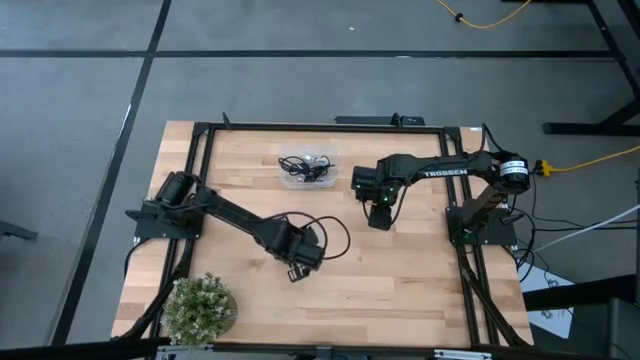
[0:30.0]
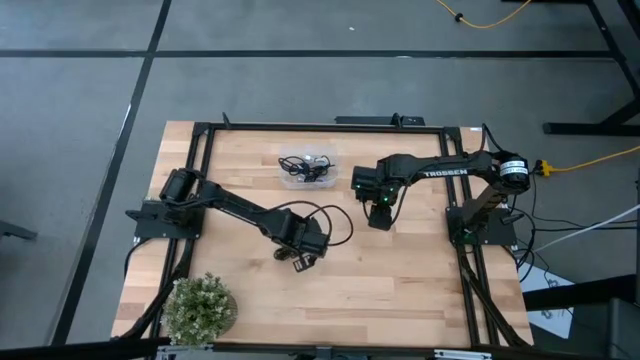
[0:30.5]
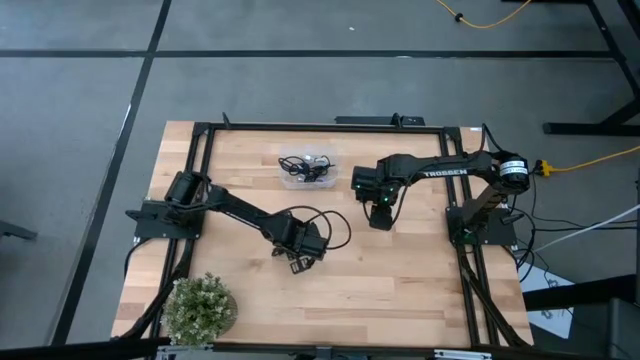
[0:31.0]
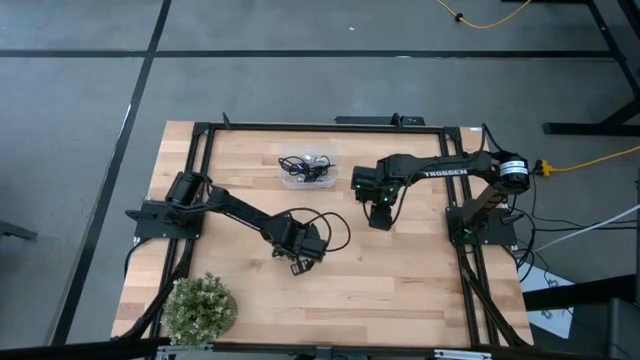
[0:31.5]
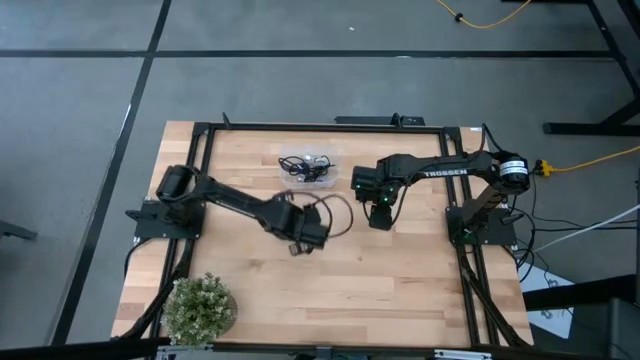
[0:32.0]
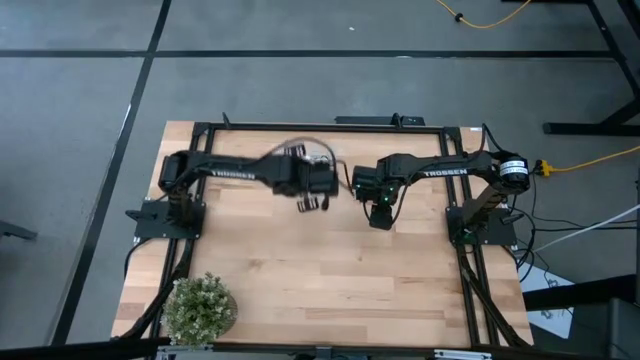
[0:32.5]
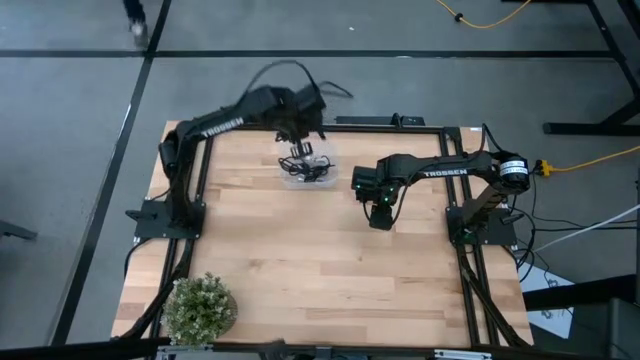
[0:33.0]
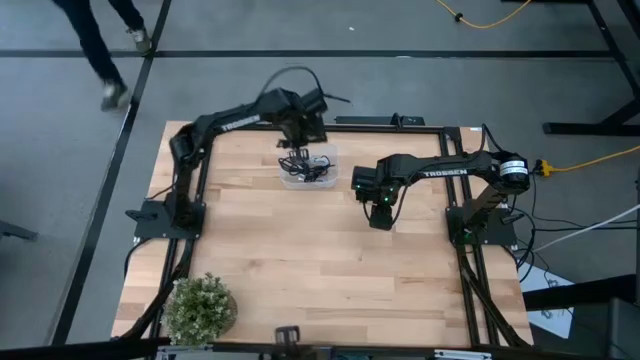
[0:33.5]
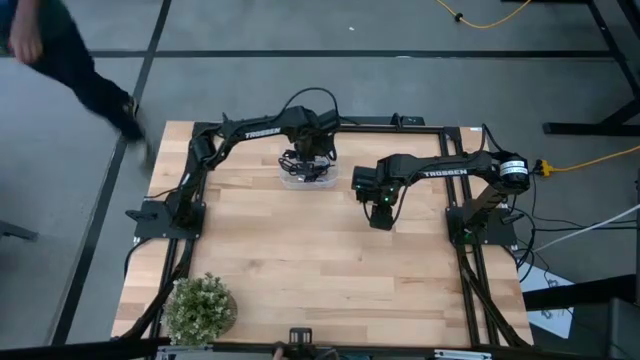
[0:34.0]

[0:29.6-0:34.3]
Task: Pick and place USB-C Cables
Put the black charger cable into the transparent bin

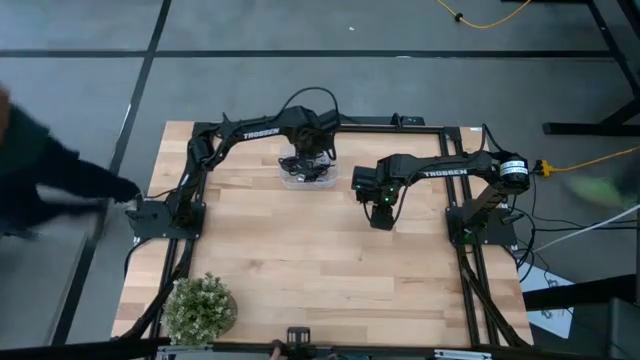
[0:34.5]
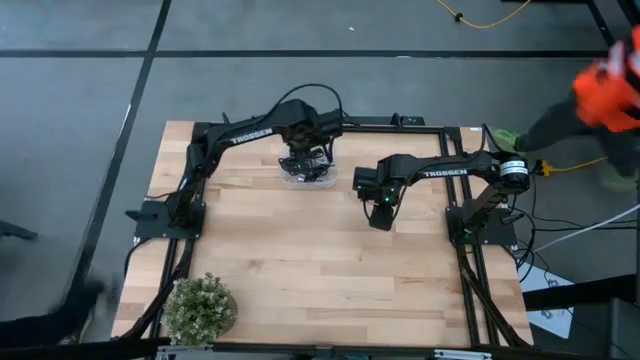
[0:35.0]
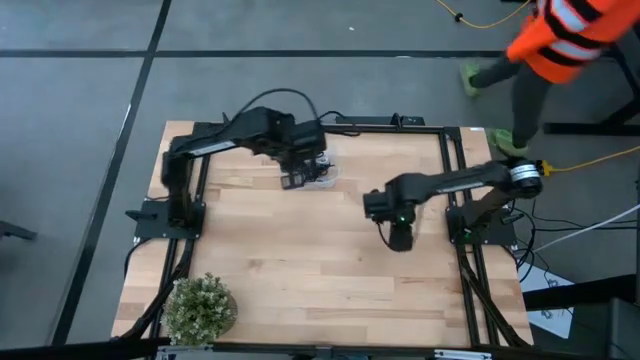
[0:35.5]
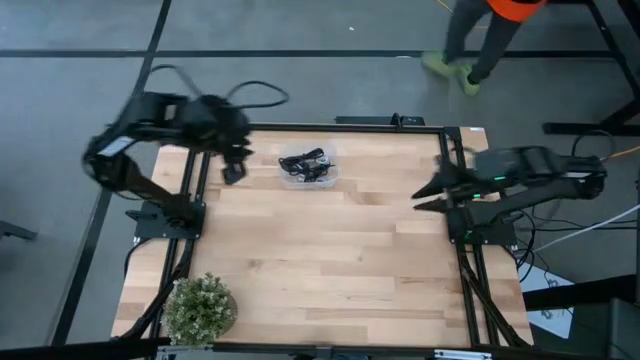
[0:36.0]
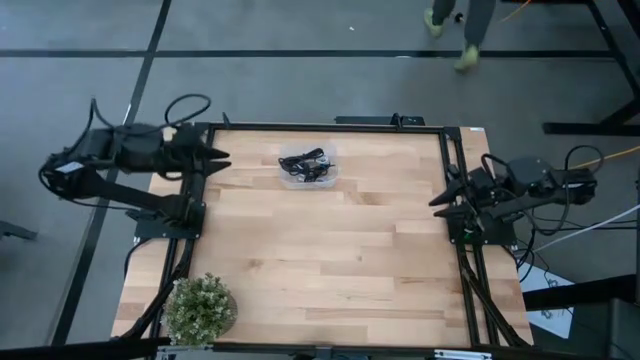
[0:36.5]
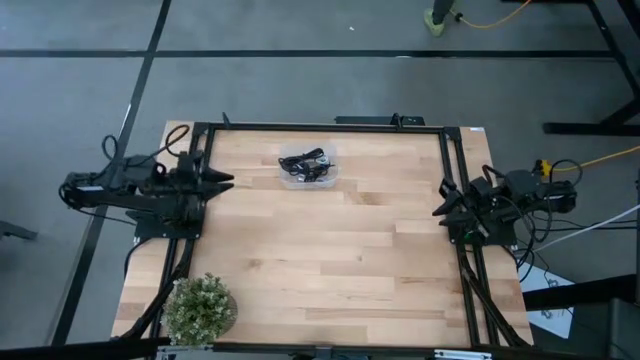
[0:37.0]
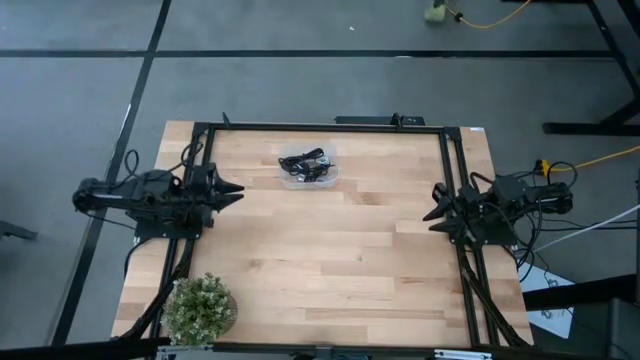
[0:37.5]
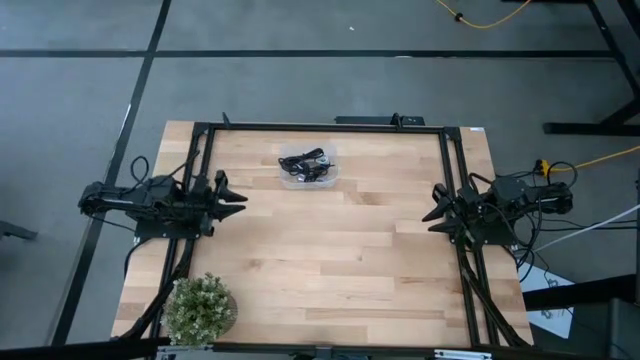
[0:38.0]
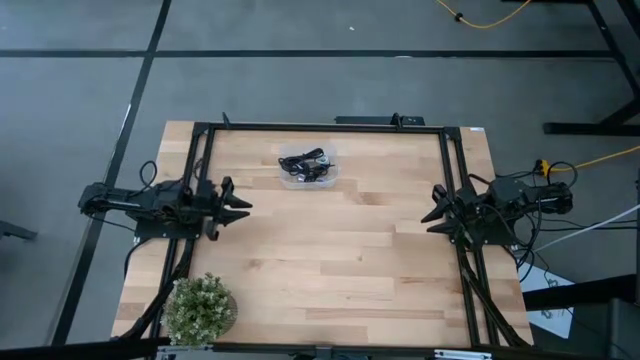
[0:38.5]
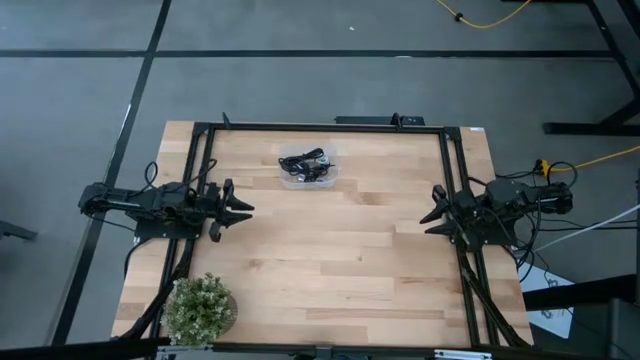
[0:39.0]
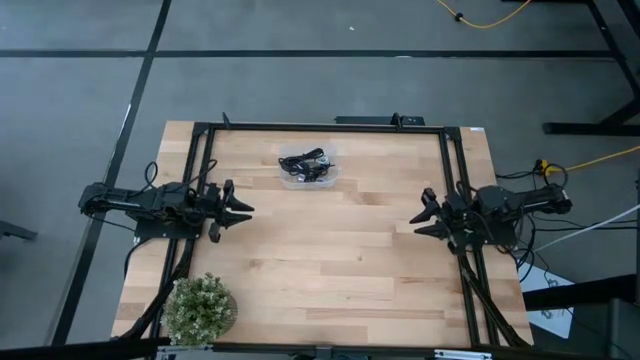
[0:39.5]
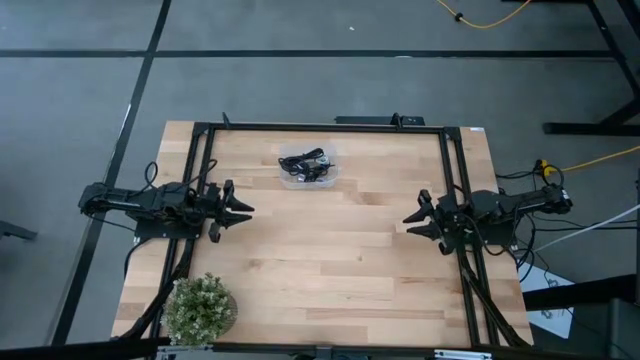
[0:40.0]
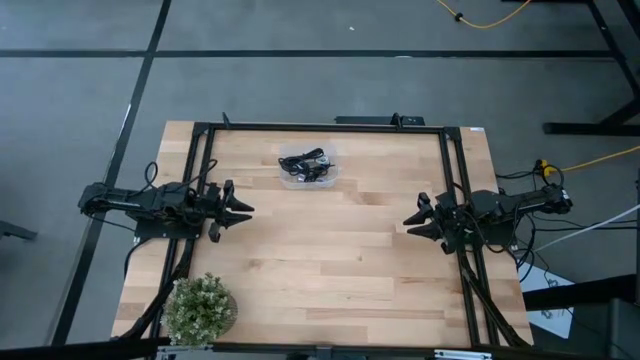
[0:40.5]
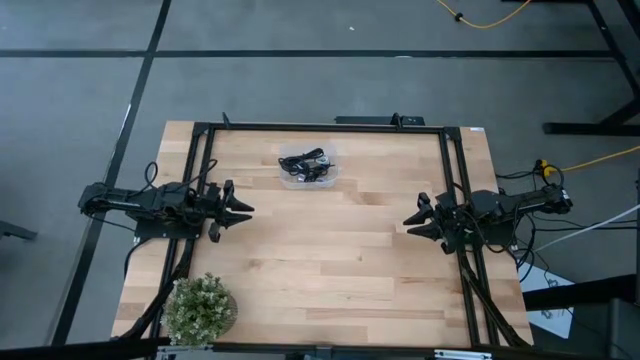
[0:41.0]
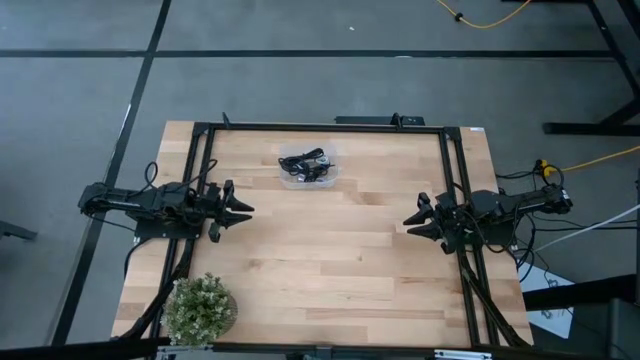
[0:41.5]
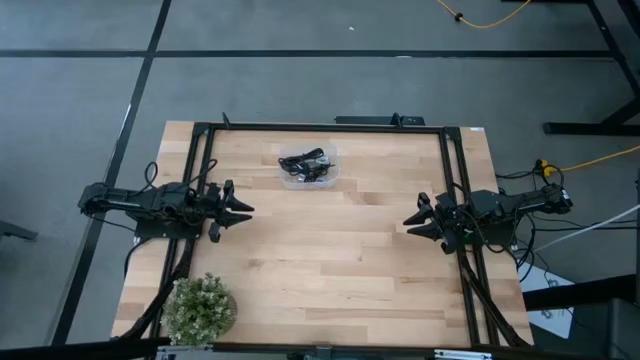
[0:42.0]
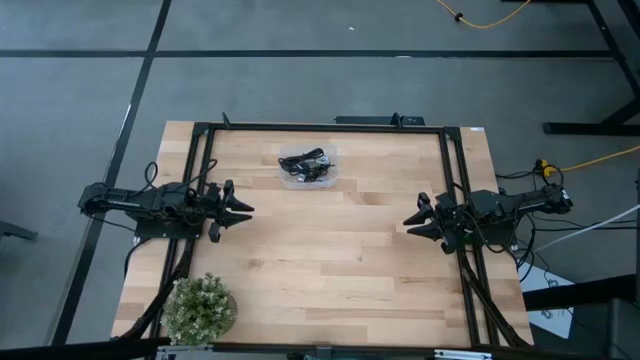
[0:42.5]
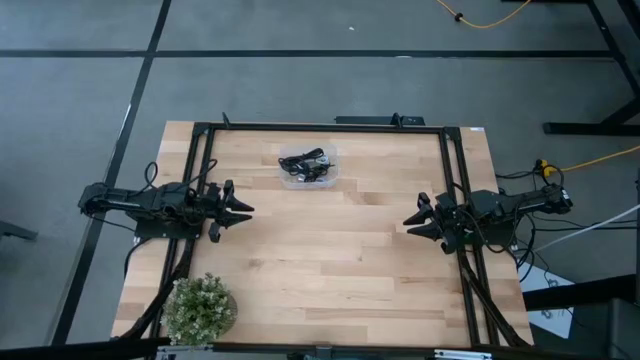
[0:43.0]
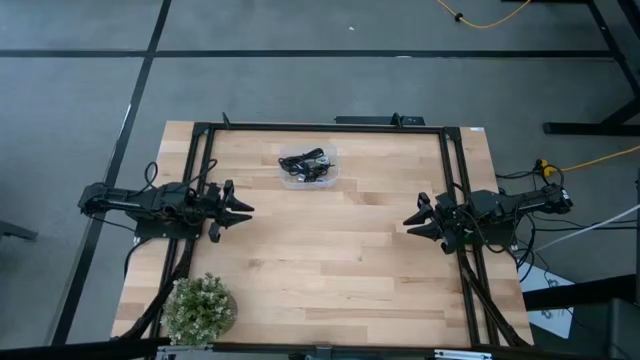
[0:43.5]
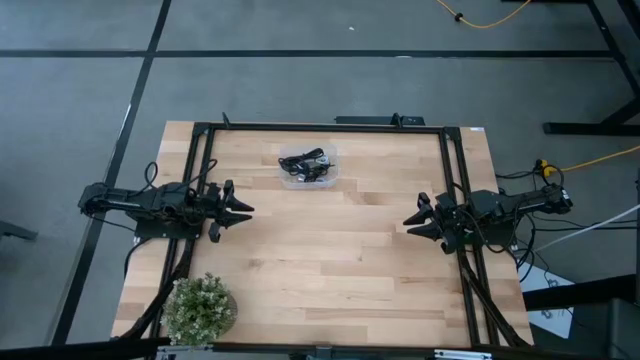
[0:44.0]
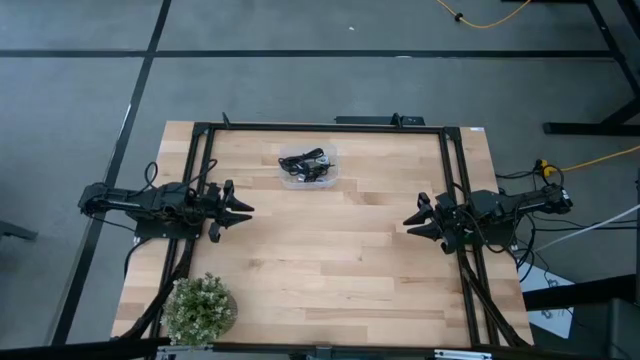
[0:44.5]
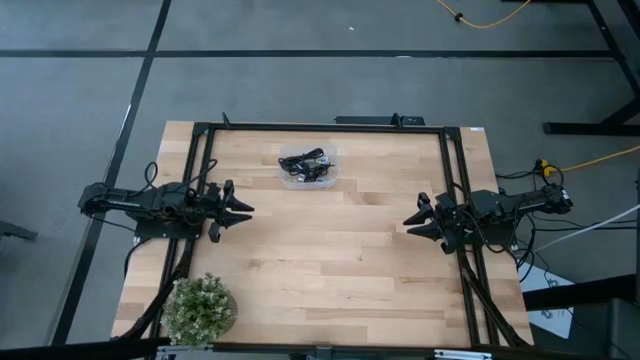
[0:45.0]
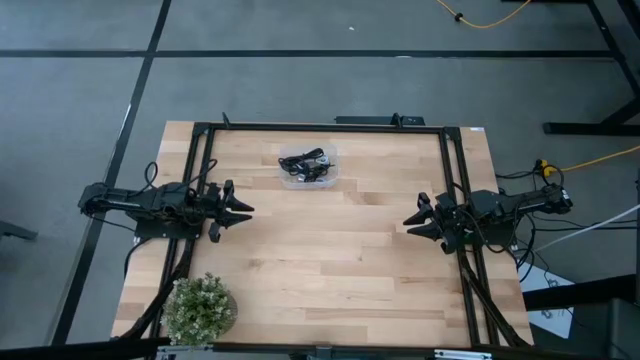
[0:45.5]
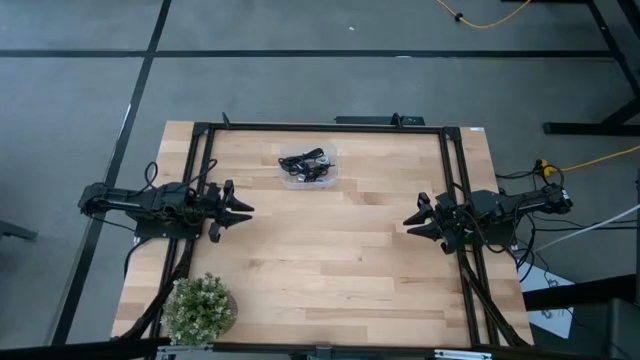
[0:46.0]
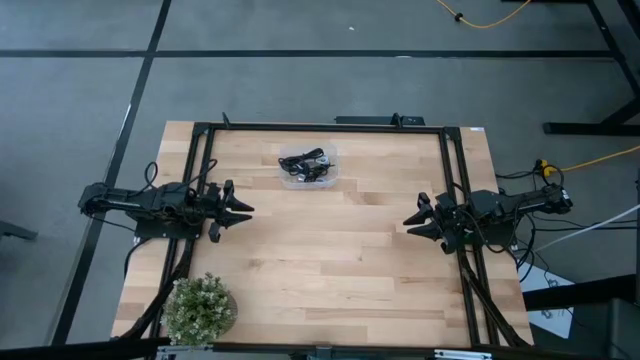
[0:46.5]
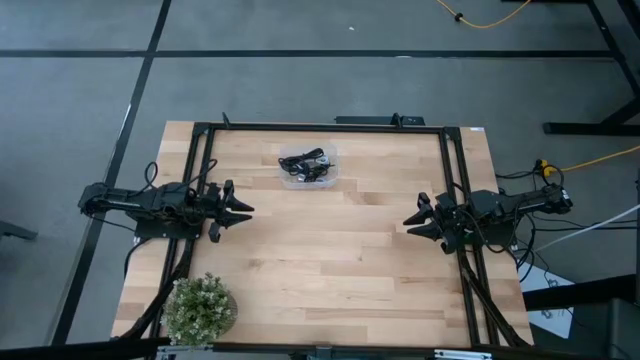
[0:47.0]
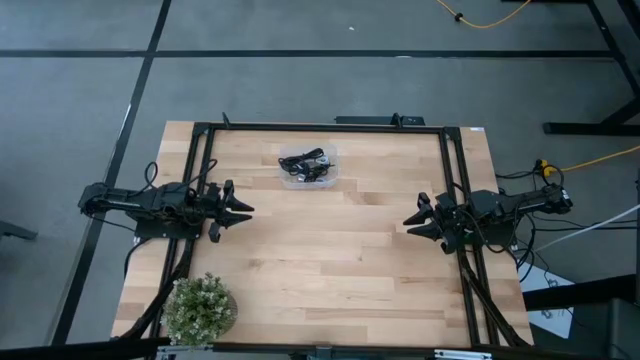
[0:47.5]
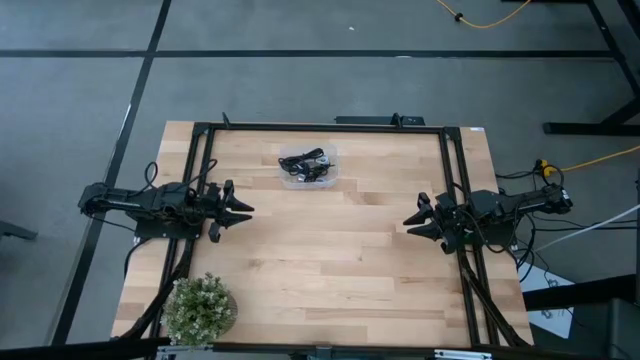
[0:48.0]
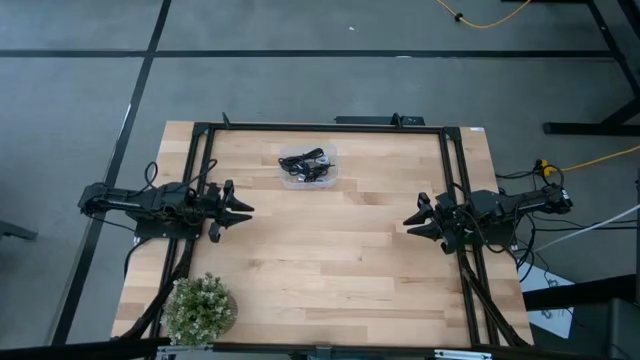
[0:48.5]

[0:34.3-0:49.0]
Return to Home Position

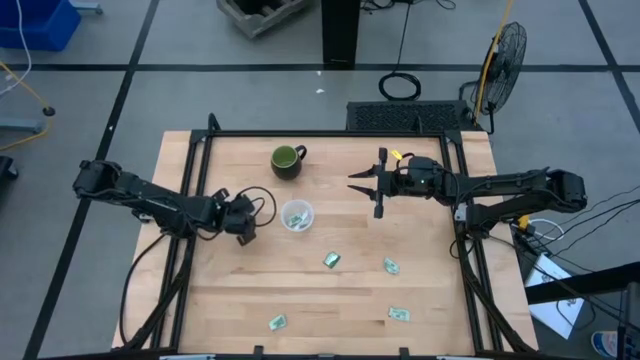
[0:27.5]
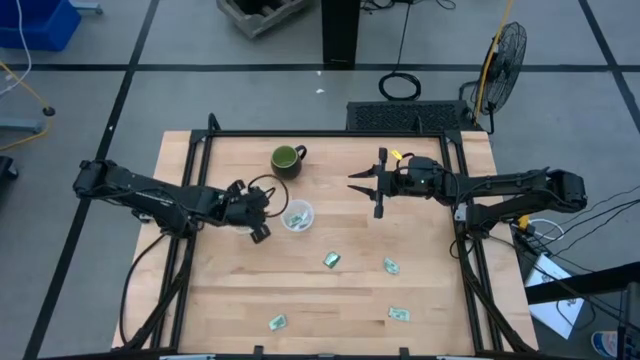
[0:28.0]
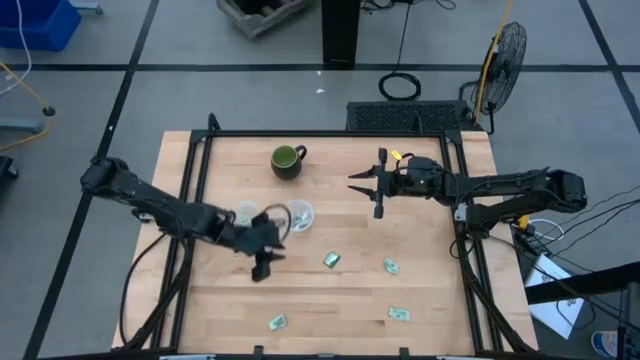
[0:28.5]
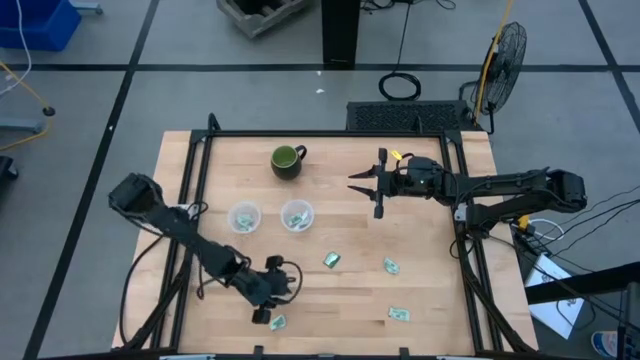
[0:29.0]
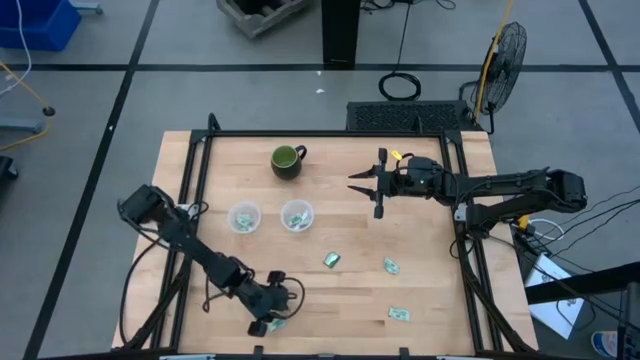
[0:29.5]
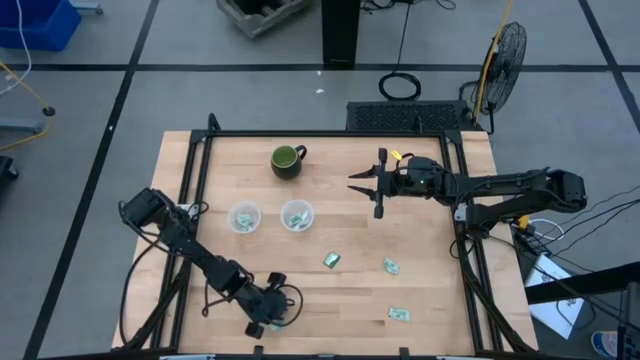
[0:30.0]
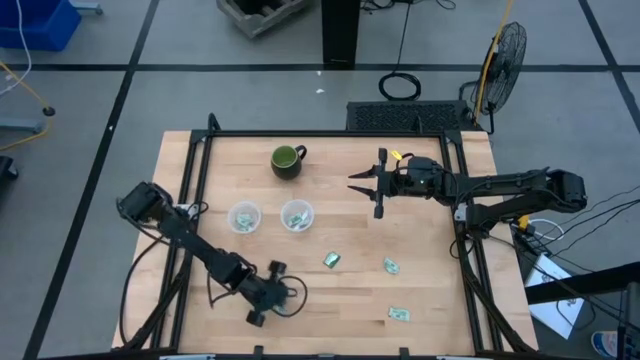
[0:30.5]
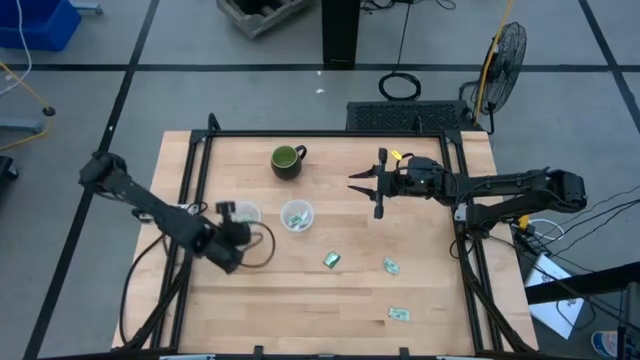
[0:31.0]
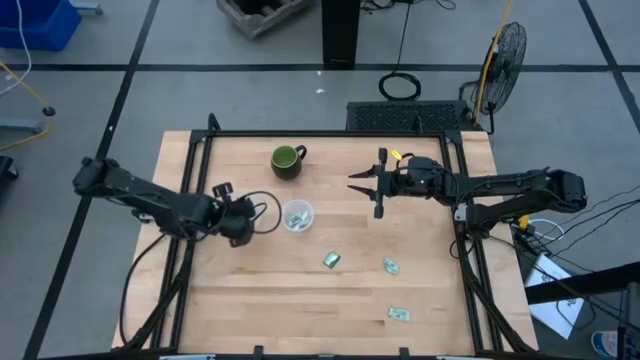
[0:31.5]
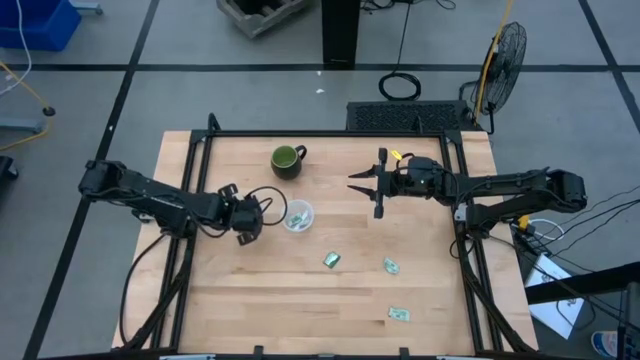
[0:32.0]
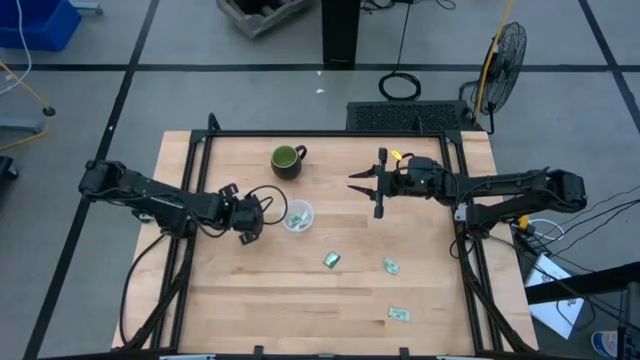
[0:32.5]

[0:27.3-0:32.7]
Task: Pick and place Stevia / Truvia into bins
Put the stevia pocket in the left plastic container
